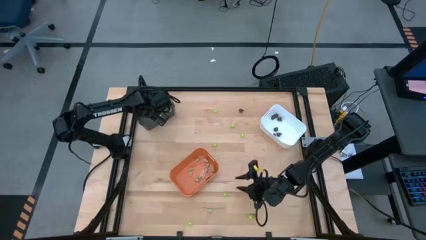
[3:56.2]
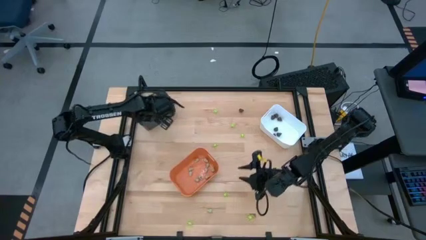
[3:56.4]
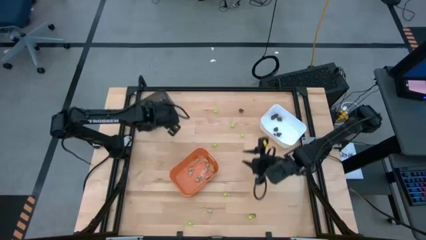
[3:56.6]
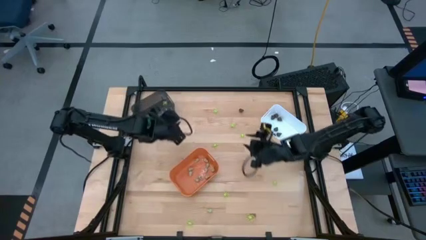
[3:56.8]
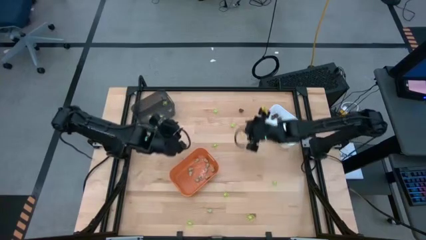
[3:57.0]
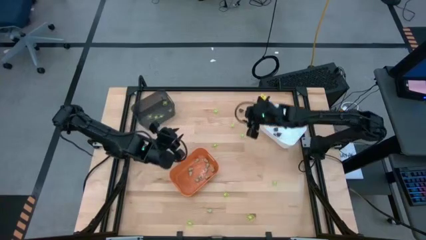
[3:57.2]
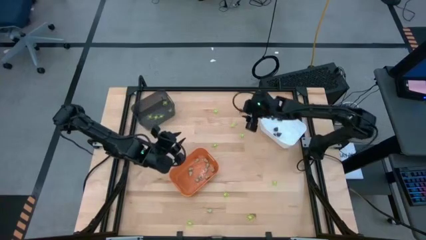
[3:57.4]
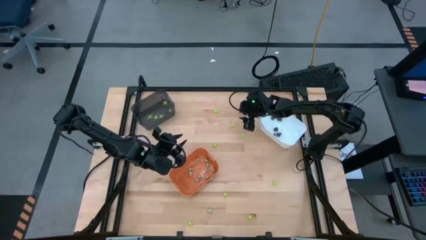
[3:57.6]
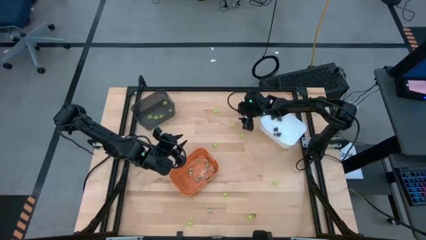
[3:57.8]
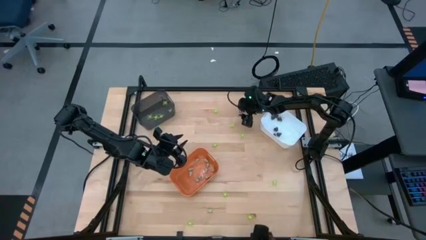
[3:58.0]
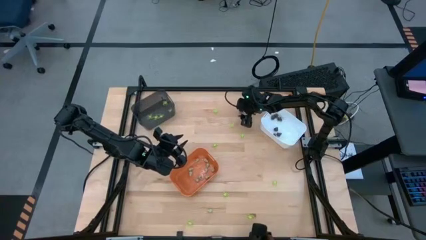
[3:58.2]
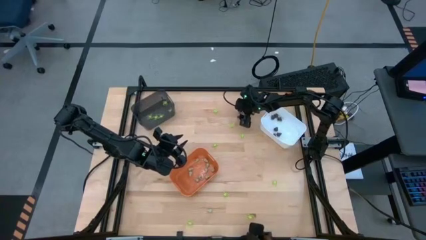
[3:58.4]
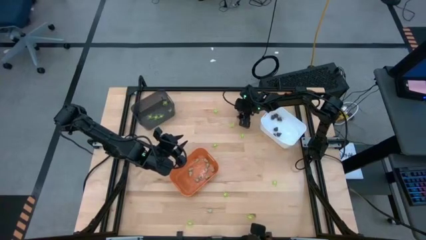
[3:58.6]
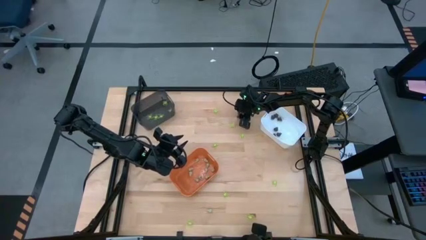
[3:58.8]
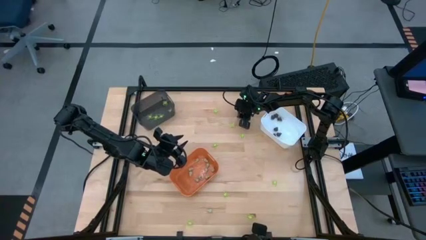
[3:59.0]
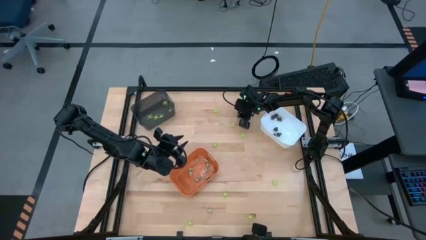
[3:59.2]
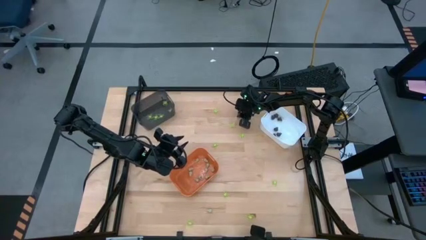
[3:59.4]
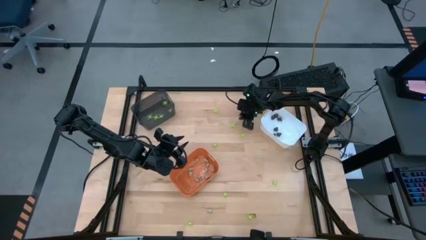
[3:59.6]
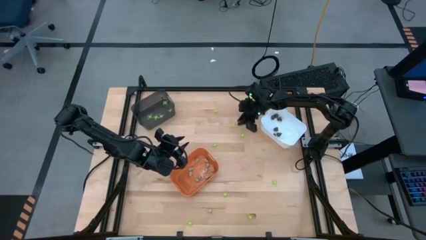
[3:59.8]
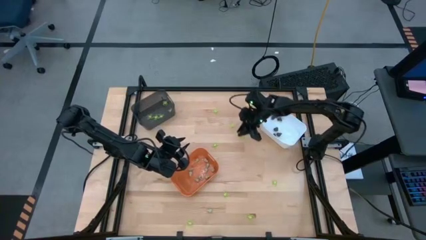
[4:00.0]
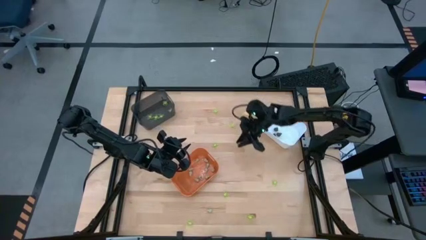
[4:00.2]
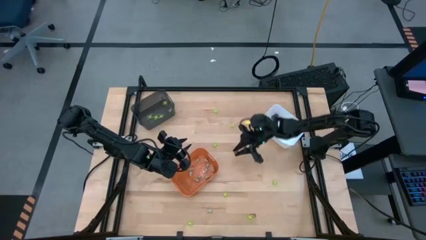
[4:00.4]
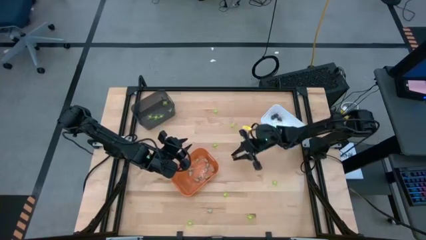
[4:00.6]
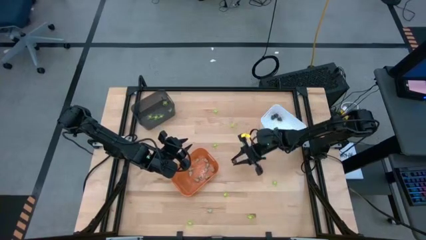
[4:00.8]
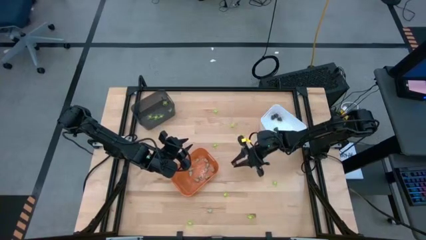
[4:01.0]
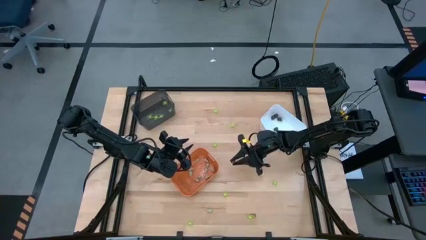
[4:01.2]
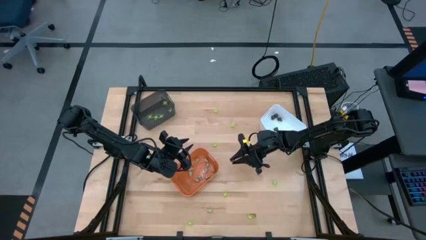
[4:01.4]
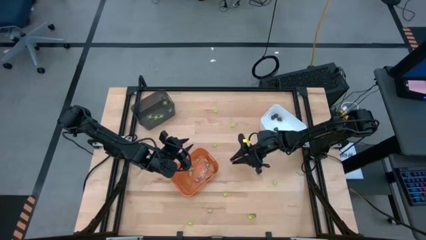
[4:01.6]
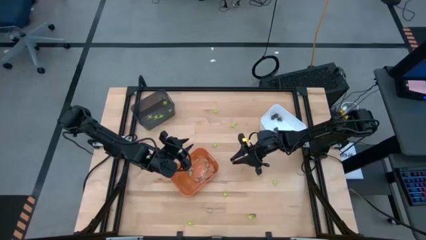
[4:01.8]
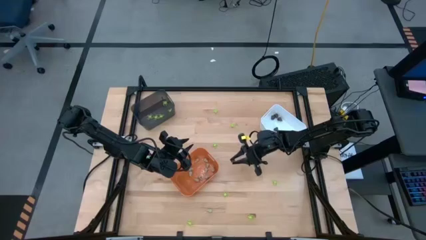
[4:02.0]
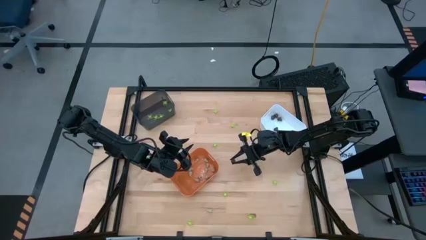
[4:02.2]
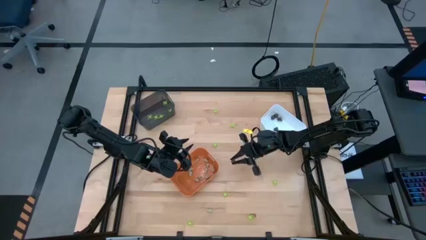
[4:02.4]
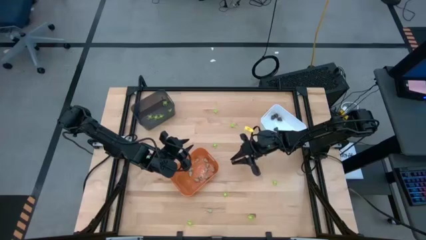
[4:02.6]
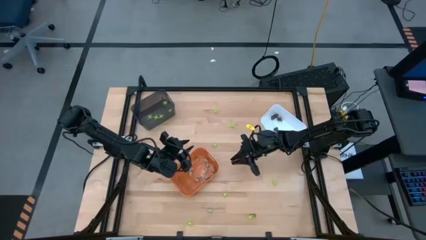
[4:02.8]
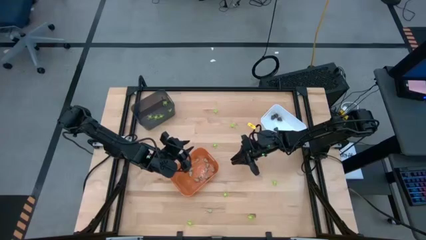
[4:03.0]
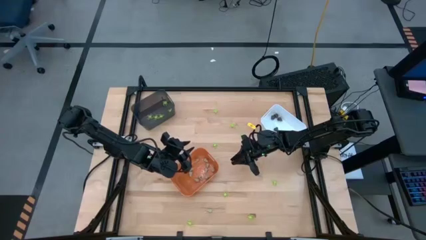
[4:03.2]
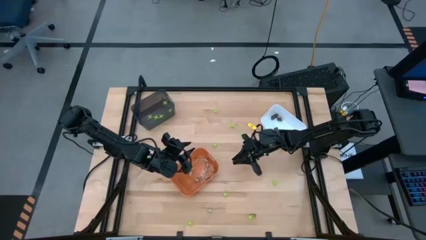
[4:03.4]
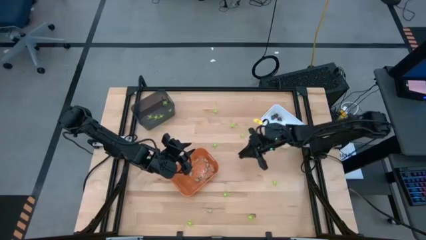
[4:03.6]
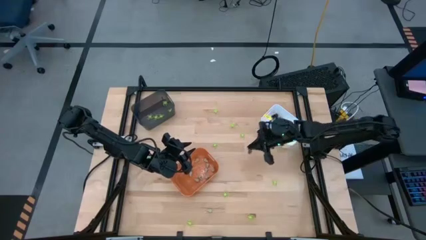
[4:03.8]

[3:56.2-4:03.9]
Task: Sort Halloween decoration
Put the small transparent skull toy into the white bin

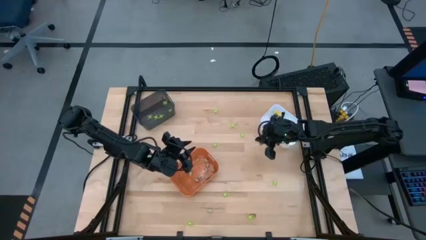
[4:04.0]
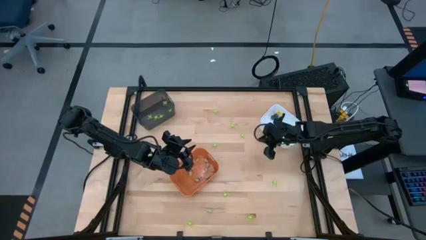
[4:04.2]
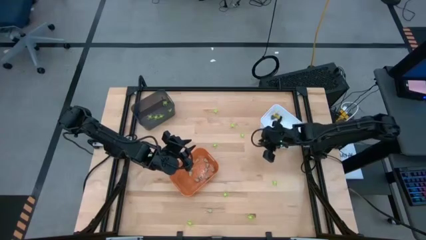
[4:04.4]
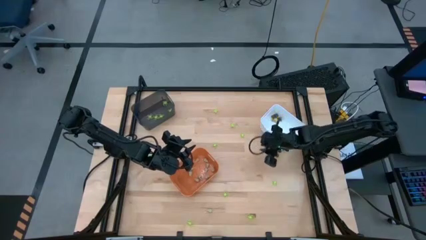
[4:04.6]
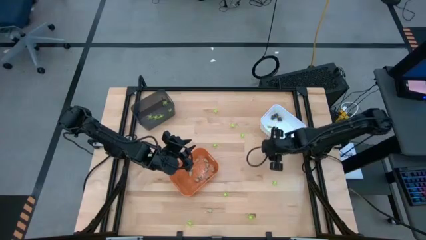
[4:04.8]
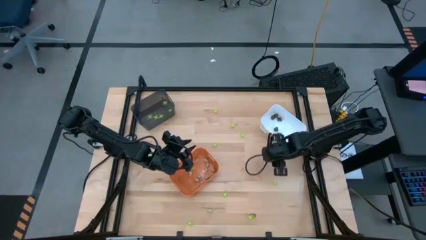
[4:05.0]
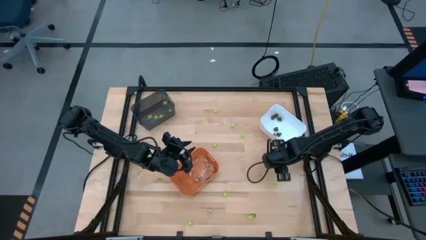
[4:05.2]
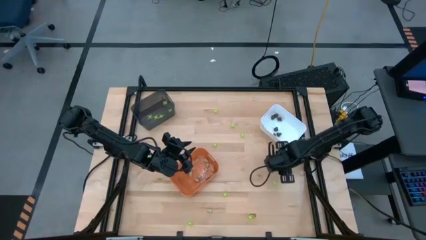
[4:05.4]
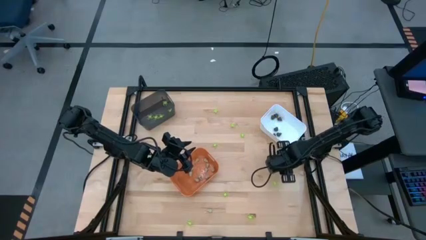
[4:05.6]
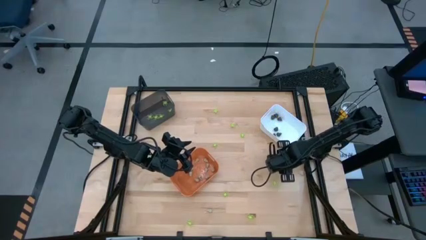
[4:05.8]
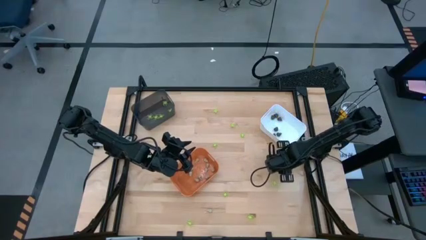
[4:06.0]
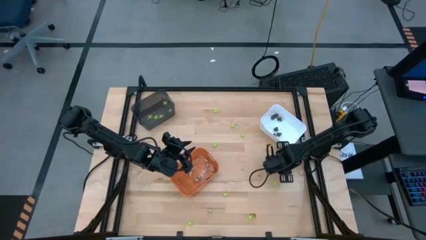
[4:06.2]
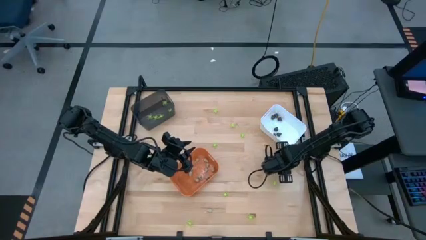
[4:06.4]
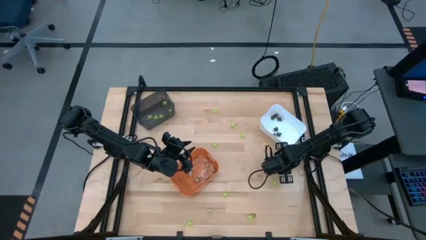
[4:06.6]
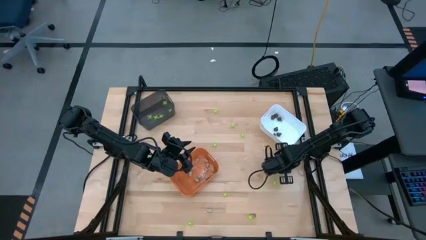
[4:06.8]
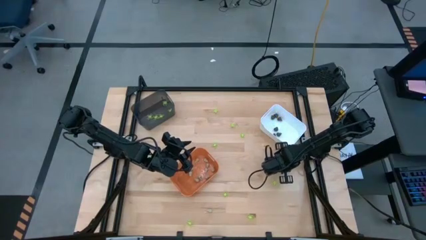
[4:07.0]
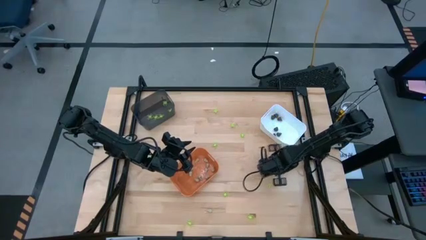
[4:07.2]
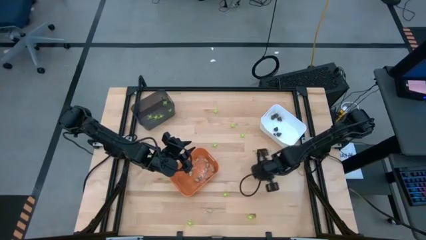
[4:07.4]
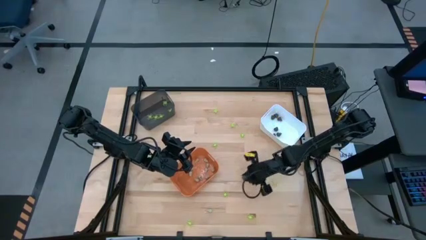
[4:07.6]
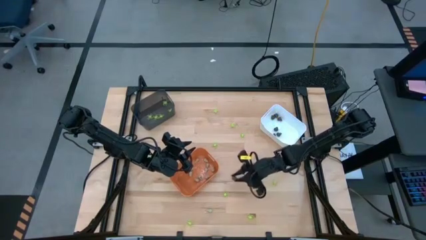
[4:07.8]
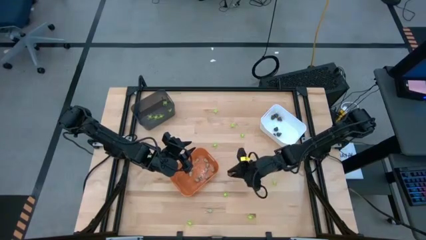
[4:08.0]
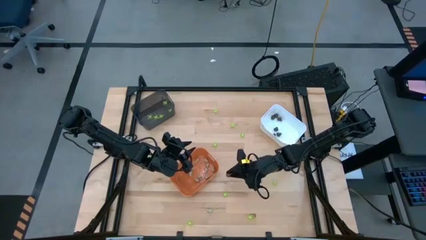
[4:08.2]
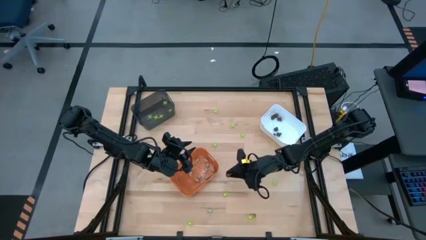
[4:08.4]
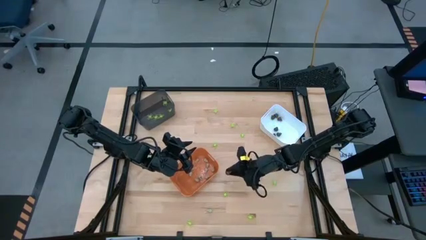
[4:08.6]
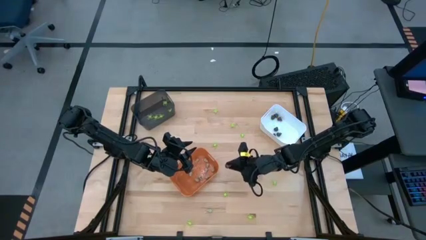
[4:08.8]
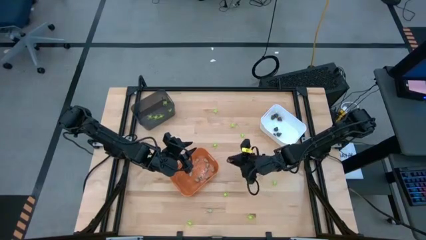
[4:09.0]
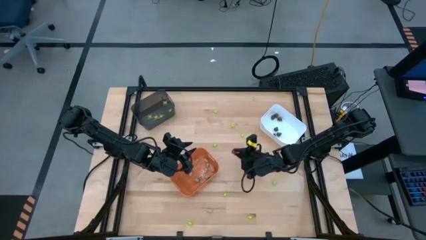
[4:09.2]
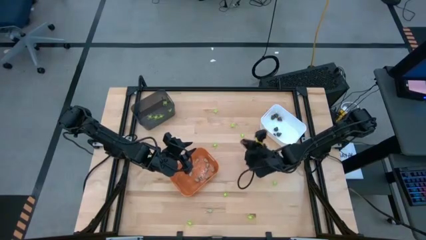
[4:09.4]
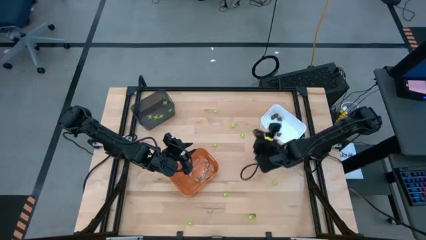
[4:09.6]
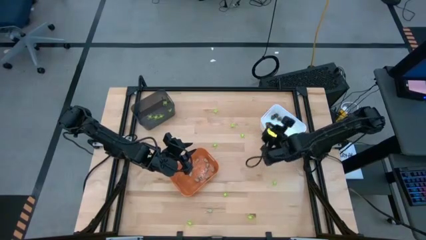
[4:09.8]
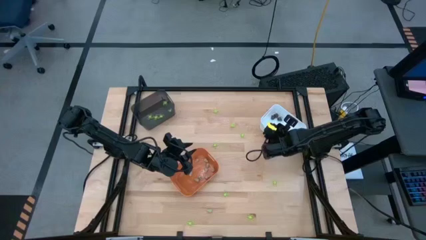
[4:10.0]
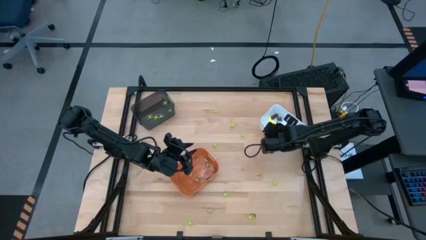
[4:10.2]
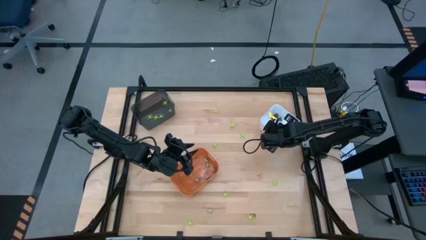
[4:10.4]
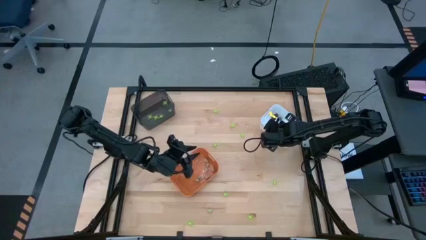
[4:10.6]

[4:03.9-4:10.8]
Put the small transparent skull toy into the white bin

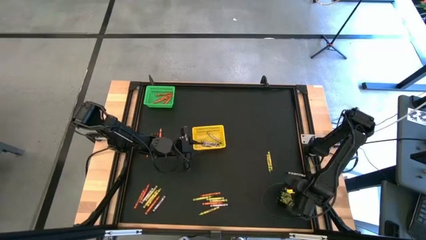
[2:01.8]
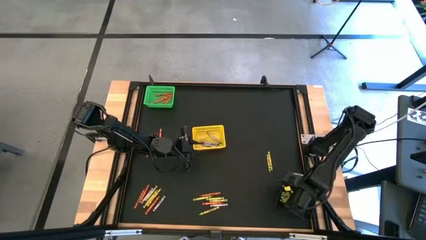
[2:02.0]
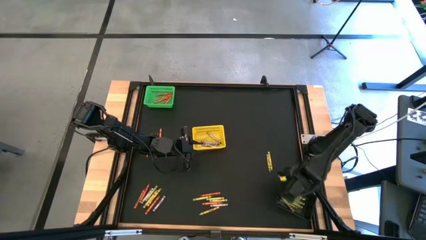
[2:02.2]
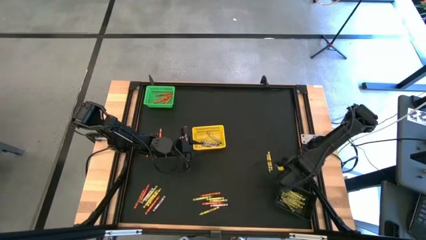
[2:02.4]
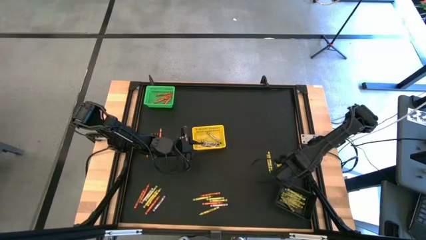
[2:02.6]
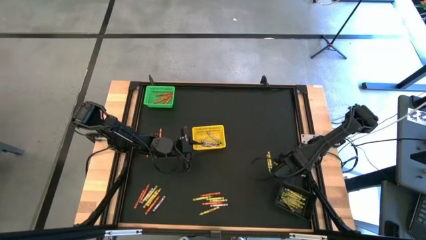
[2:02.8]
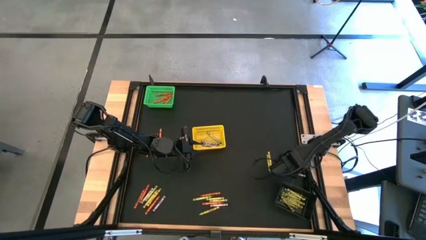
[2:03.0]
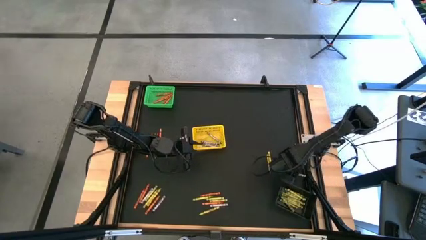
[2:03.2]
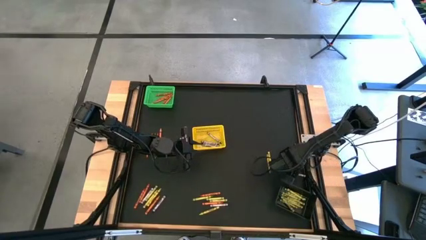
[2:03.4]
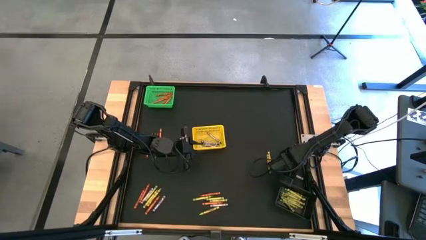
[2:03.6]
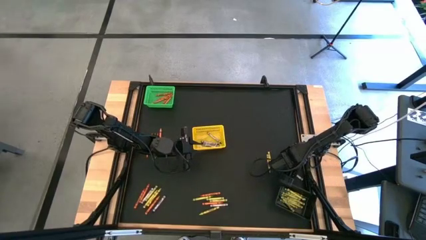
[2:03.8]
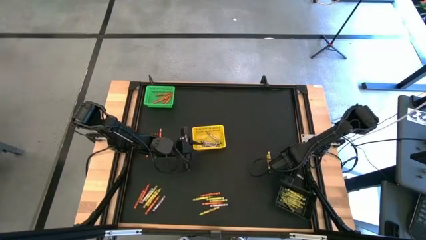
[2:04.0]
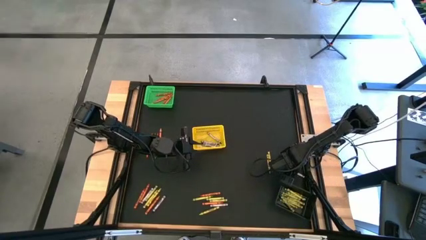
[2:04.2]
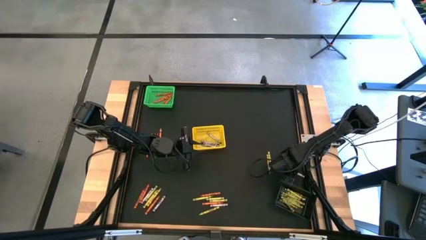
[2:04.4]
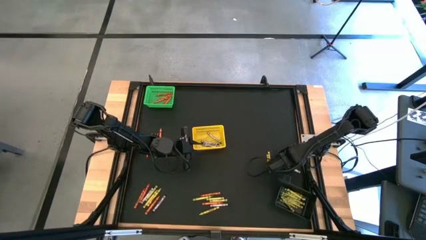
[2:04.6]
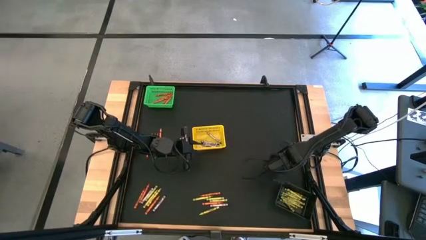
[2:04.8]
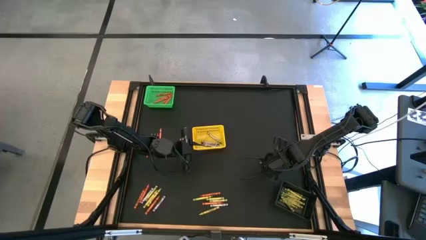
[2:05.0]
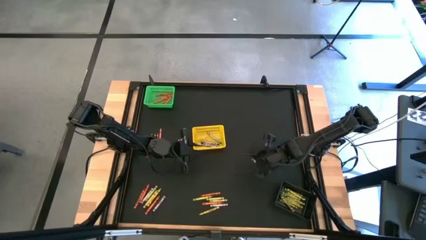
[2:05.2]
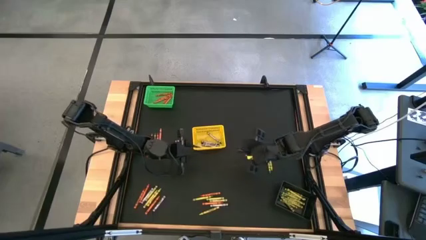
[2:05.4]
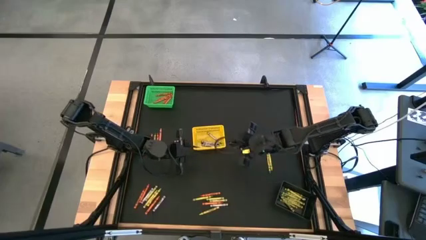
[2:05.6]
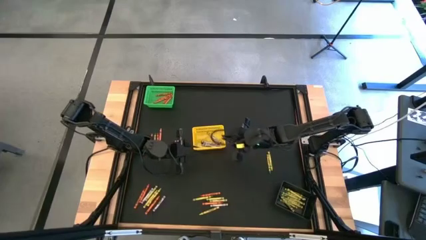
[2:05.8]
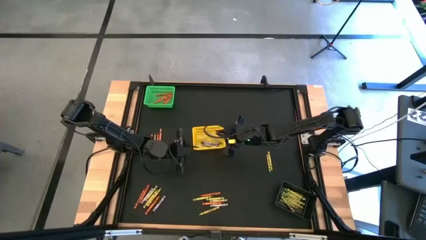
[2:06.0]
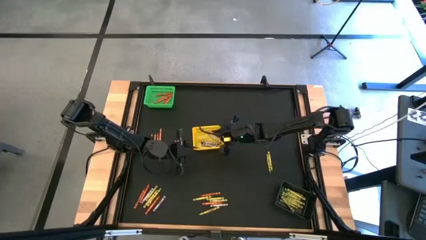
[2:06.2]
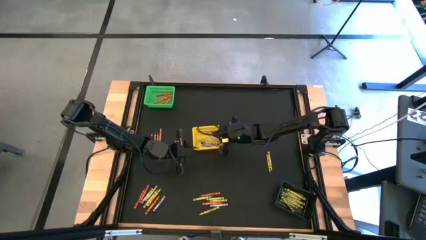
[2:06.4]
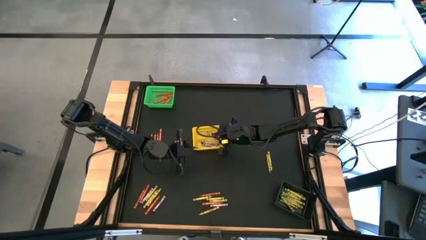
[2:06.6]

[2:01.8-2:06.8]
Task: Sort crayons
Put the black crayon into the yellow bin
